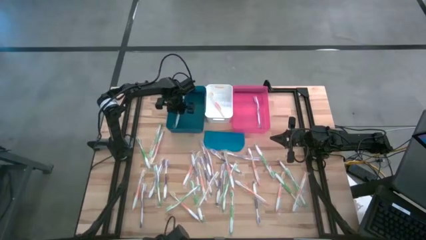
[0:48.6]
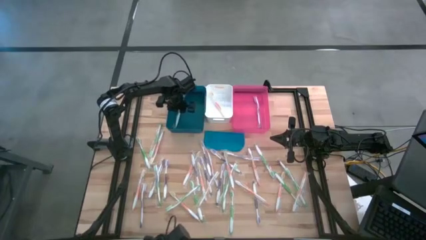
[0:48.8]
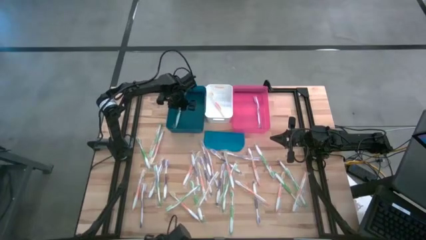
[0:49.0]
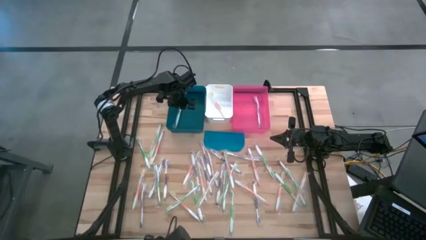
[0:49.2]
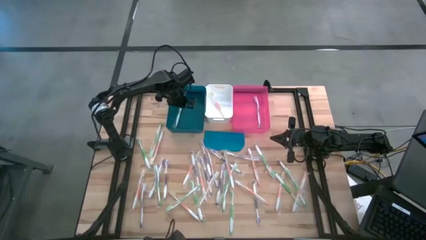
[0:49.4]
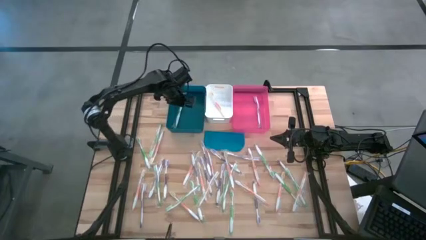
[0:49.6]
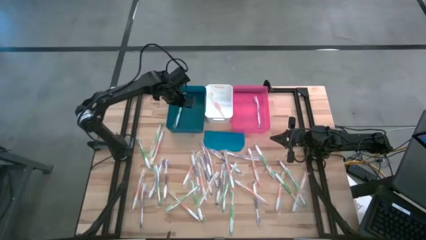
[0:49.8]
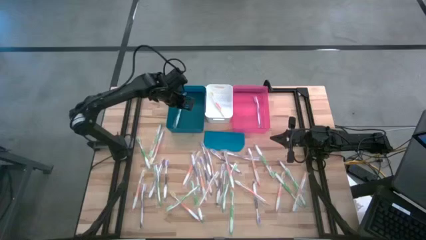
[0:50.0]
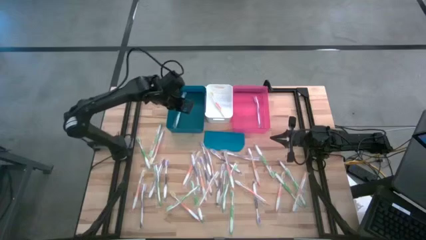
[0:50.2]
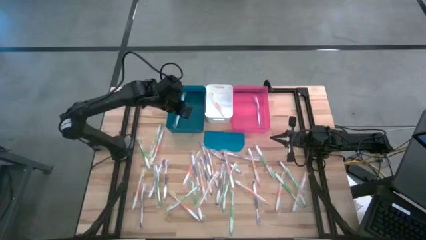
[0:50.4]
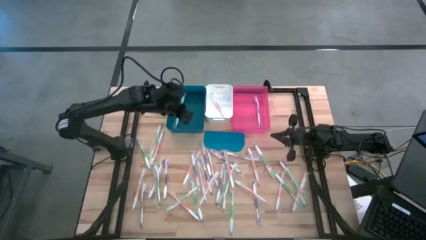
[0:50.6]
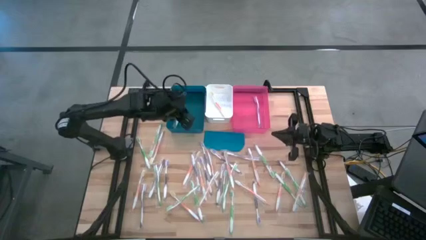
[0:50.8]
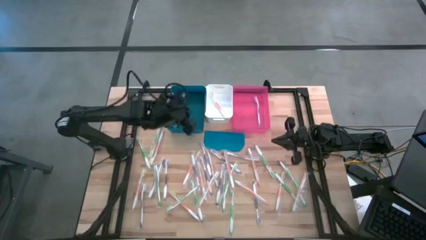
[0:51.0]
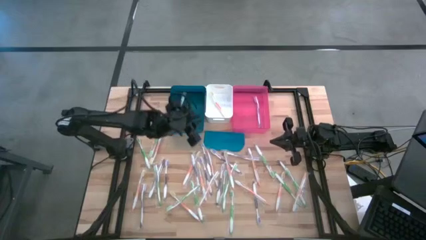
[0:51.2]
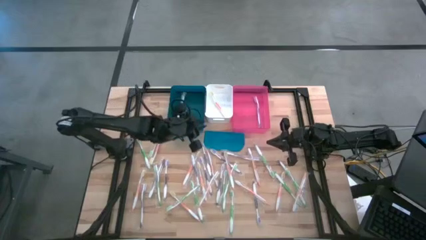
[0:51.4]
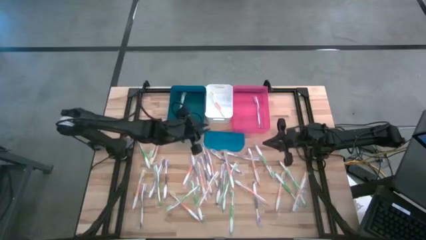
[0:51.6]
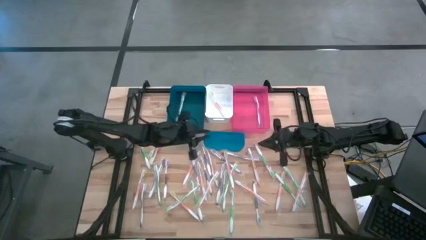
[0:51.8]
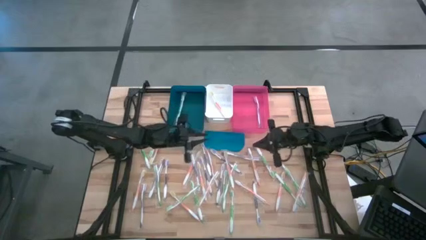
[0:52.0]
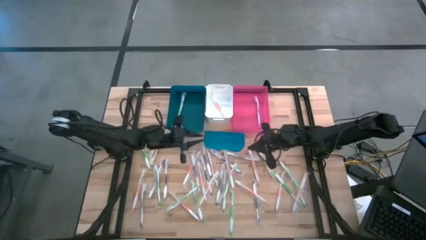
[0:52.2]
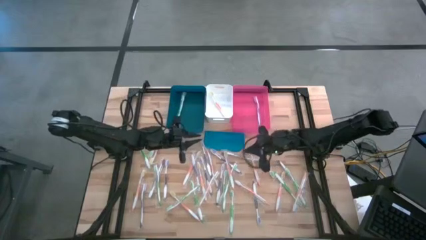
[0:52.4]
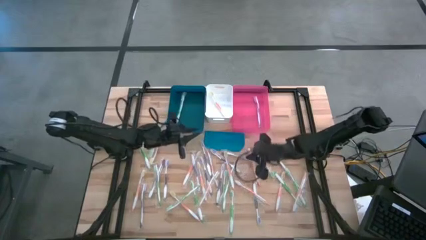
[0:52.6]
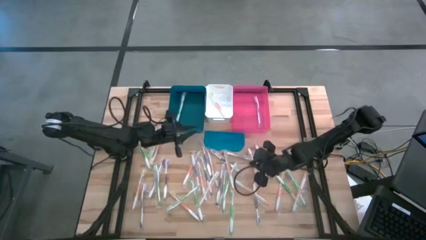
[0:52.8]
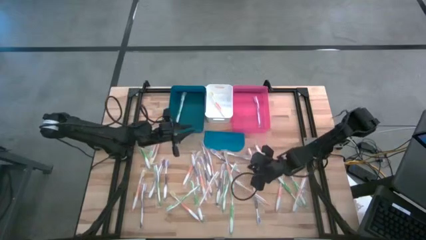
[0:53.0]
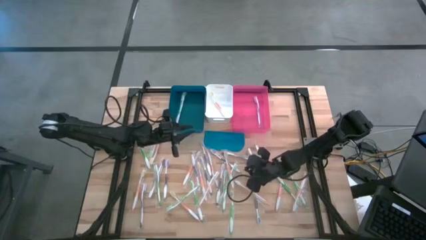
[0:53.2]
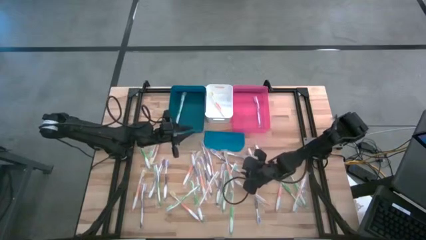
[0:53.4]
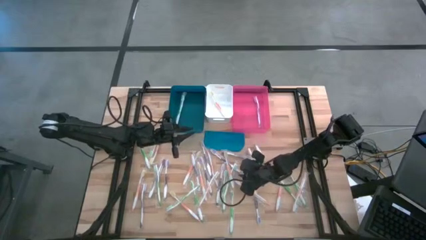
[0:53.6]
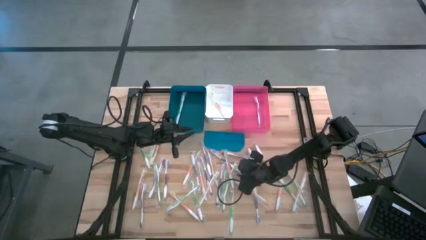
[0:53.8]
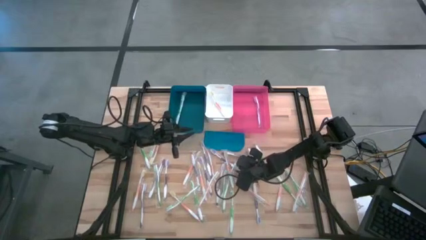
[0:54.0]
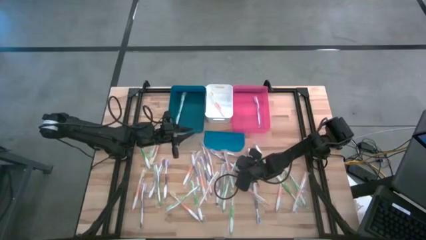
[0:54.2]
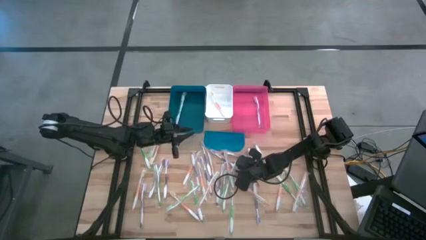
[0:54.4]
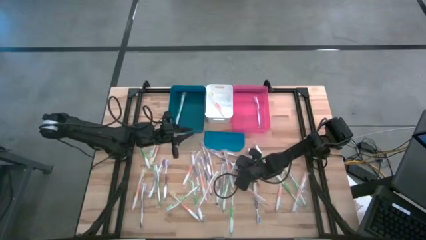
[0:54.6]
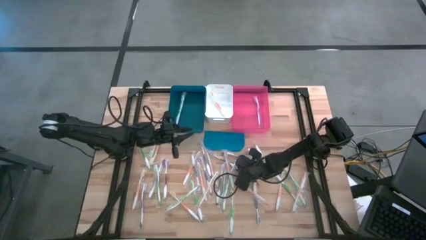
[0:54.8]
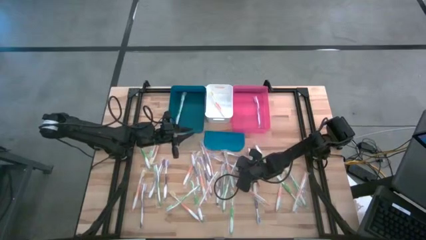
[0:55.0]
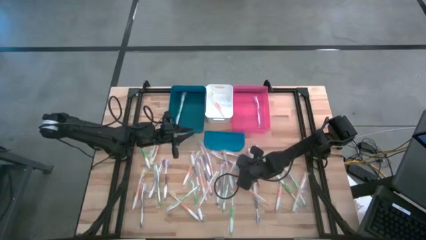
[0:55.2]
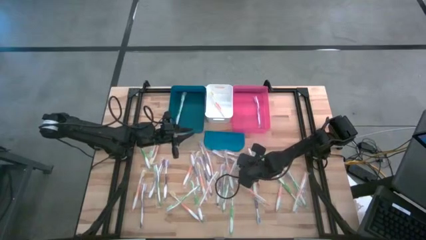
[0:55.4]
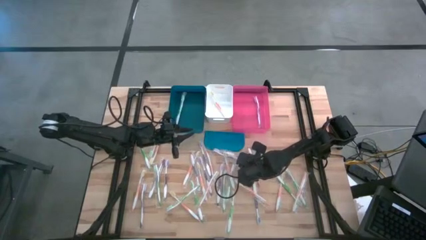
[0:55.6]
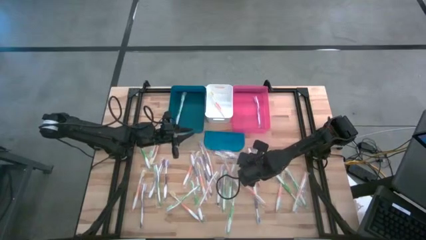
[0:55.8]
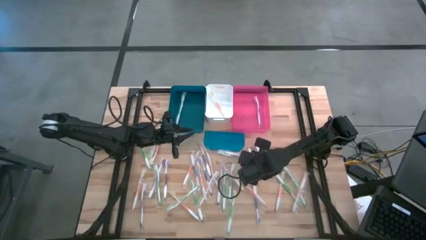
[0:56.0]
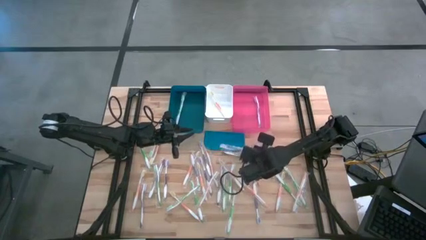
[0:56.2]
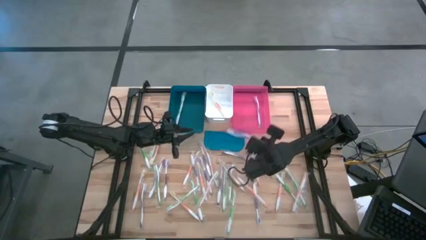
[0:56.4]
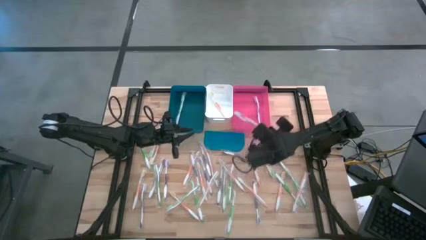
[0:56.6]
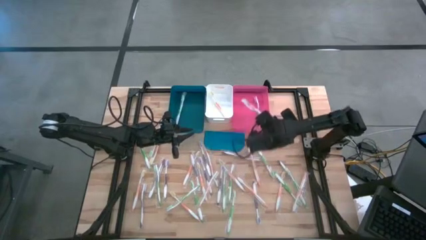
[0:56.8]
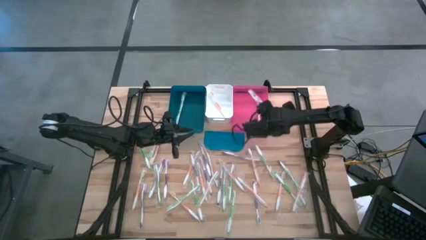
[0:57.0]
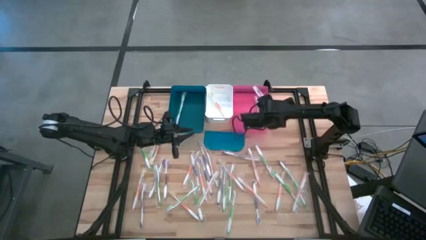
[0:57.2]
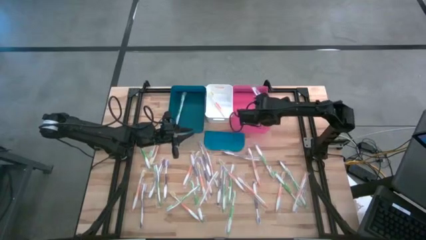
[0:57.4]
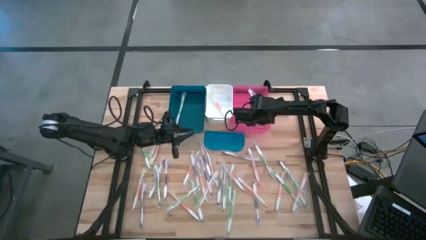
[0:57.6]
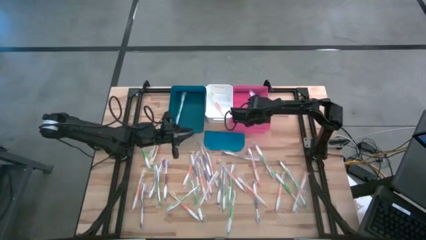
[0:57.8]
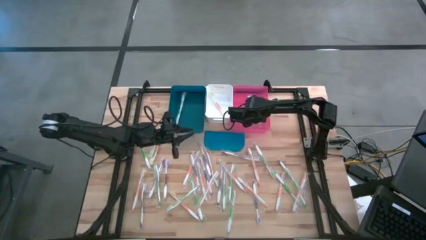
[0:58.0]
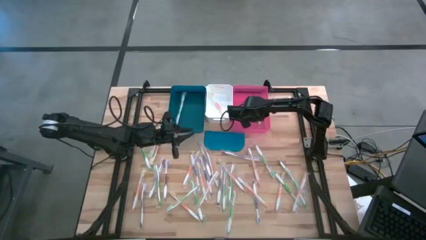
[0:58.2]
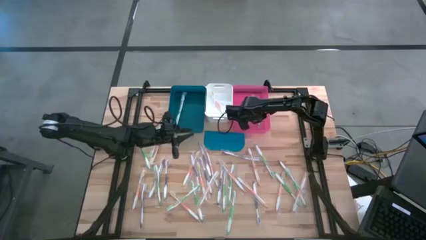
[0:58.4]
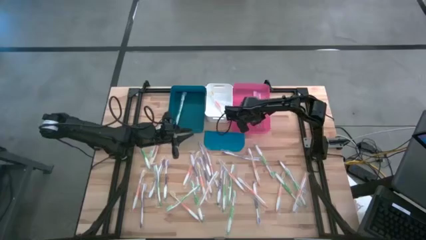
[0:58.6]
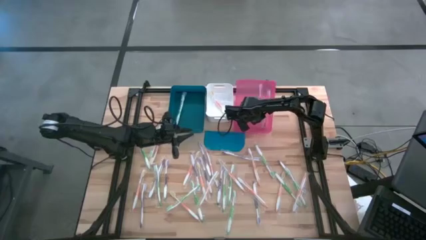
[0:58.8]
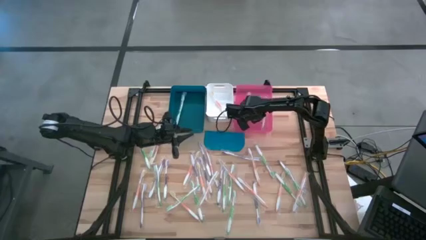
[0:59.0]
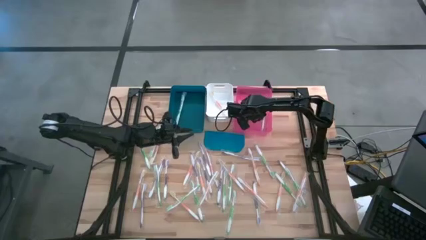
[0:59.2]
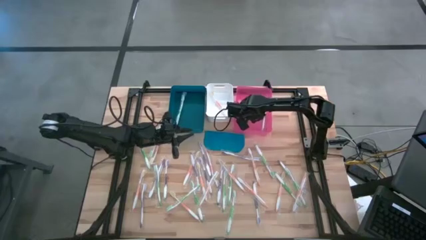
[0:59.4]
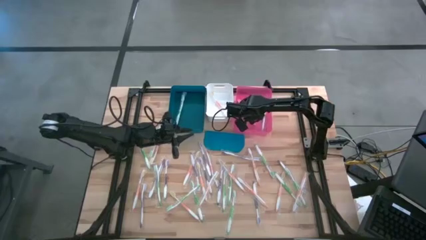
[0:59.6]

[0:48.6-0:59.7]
Task: Pick & Place Toothbrushes
Put the purple toothbrush into the pink bin

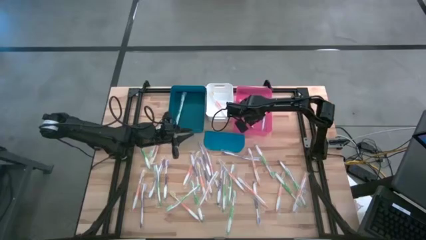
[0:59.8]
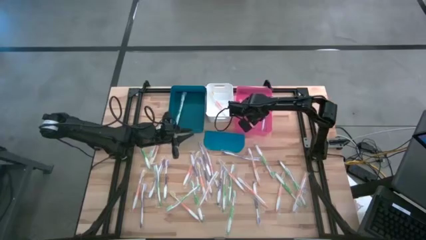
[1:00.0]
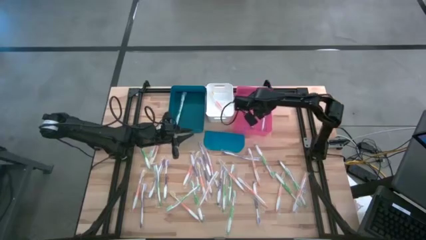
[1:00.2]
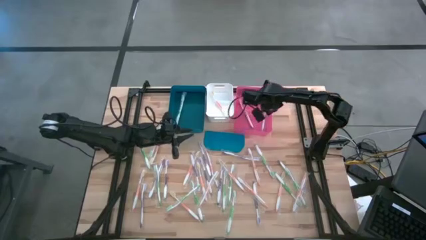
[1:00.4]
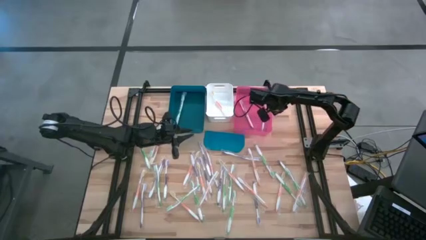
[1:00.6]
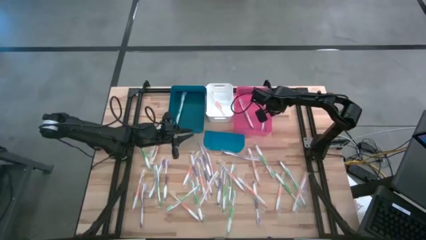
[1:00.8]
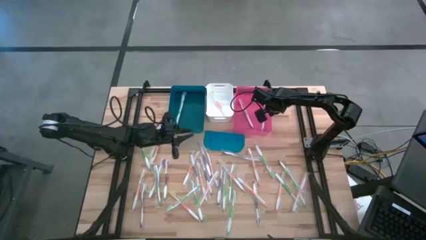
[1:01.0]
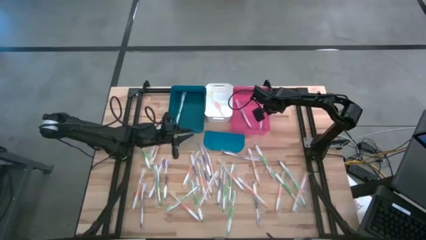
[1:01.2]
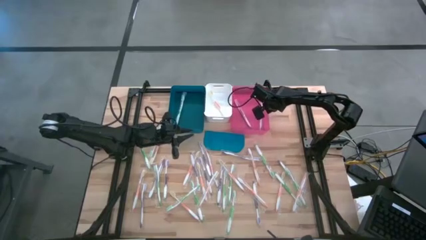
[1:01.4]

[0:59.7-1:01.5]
Adjust the pink bin on the table

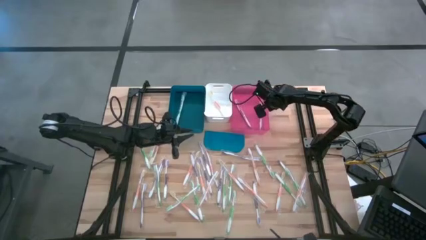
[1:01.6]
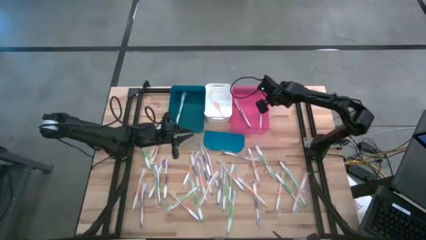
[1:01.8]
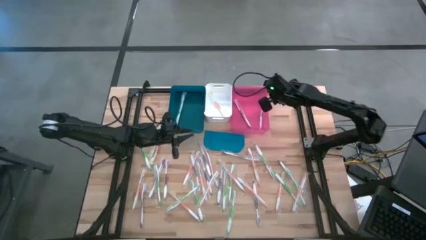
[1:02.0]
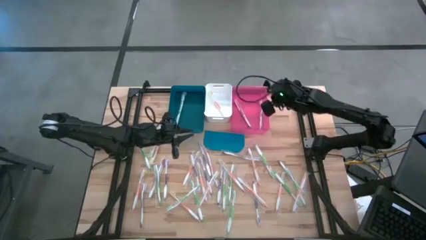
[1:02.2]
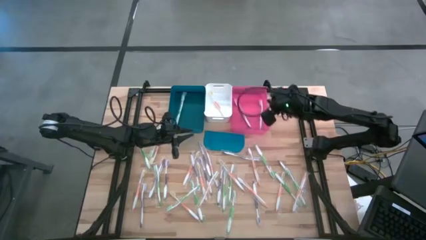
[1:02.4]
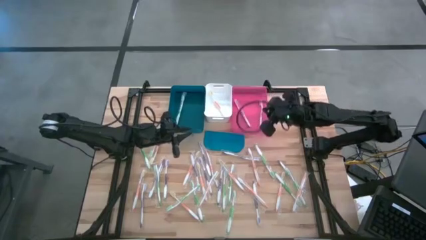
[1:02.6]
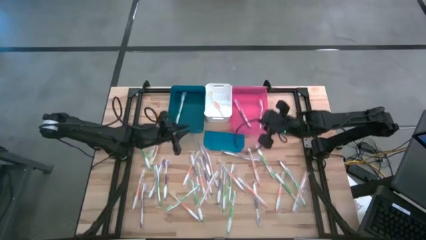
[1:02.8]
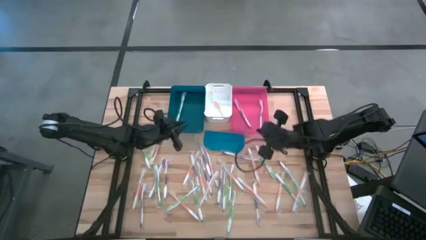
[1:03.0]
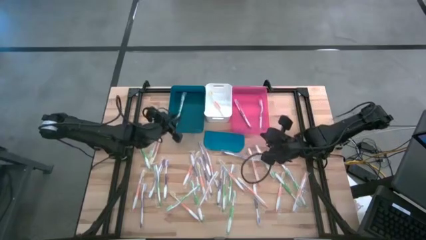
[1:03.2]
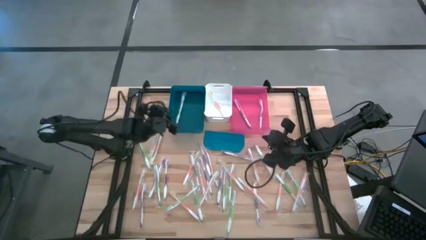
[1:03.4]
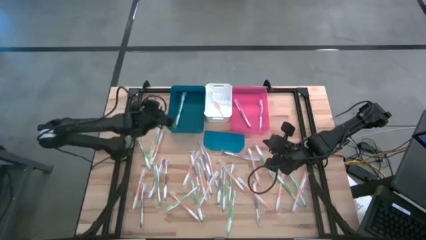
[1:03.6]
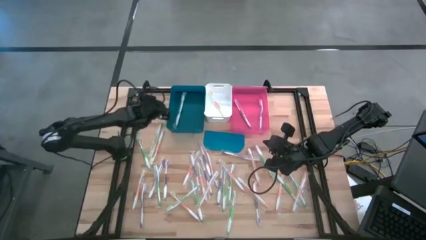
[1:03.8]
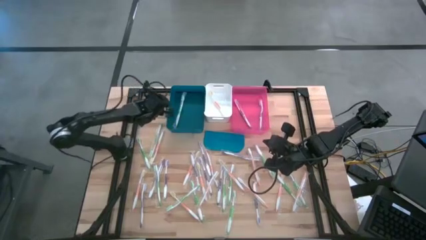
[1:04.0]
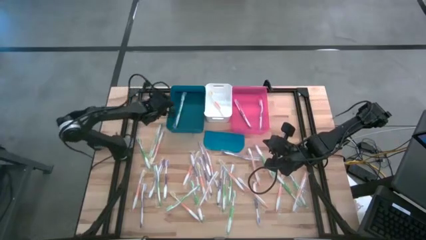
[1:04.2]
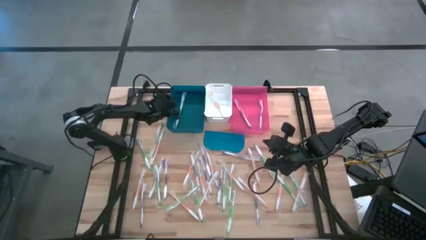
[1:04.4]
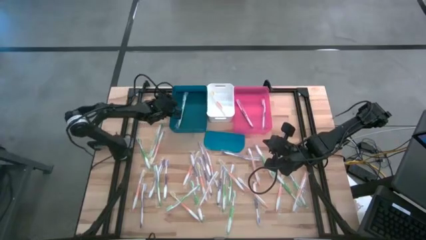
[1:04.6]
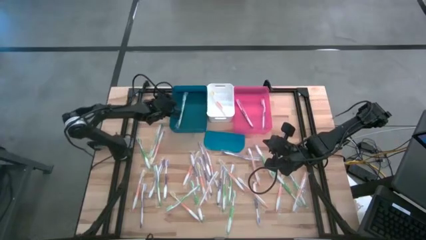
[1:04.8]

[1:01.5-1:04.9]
Adjust the blue bin on the table
